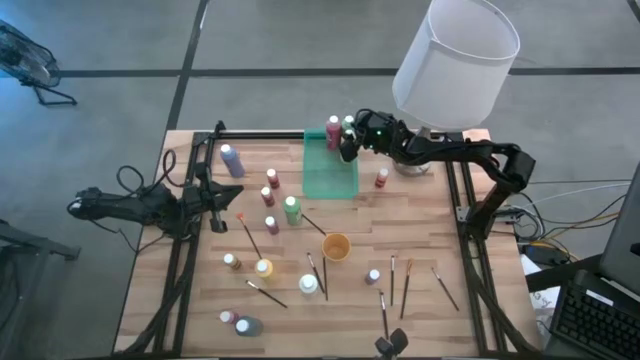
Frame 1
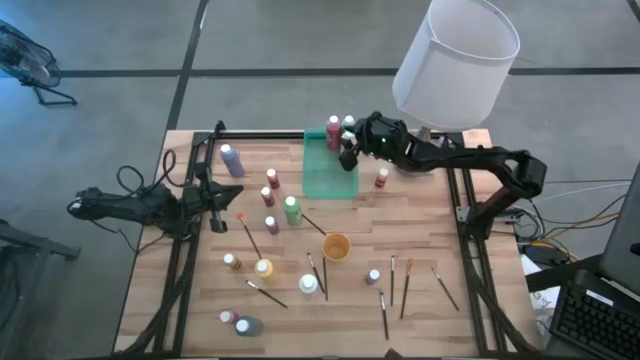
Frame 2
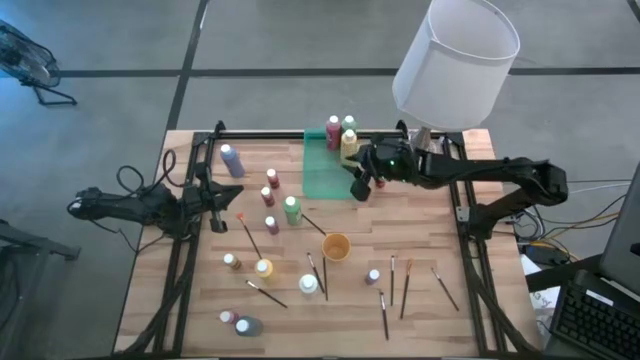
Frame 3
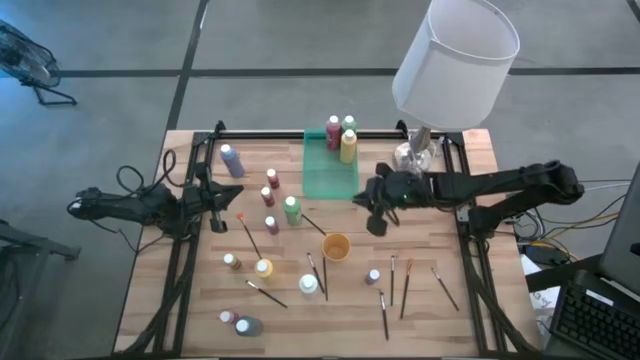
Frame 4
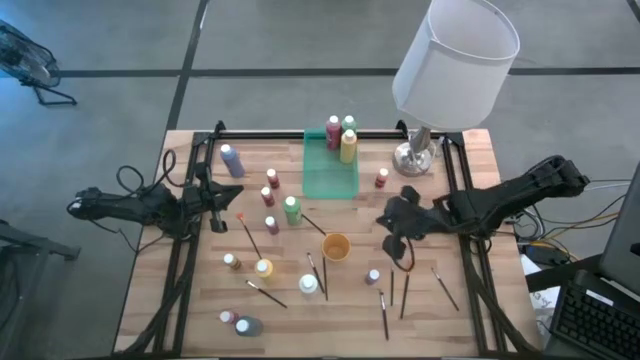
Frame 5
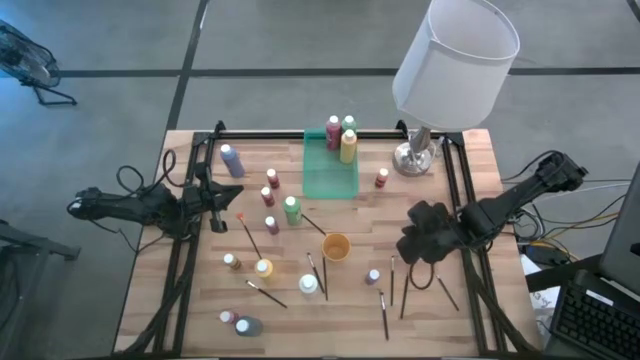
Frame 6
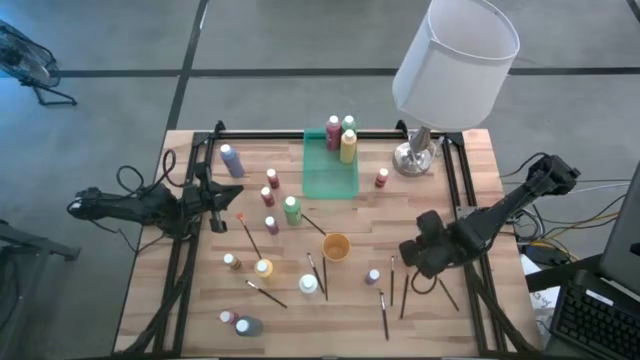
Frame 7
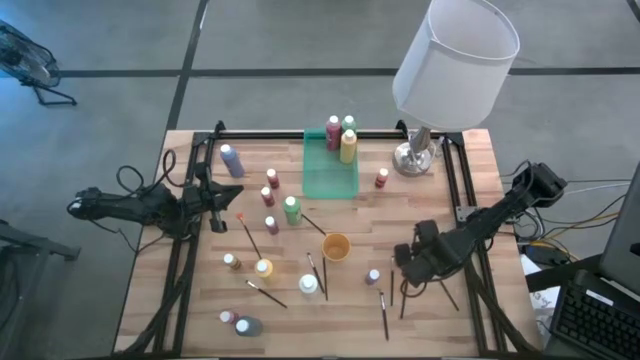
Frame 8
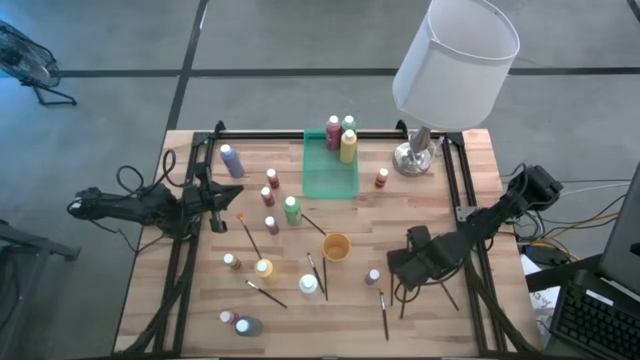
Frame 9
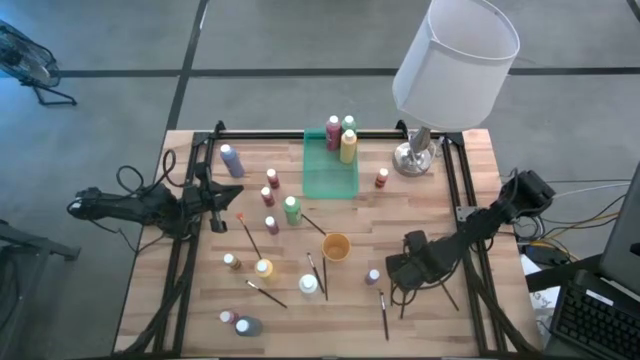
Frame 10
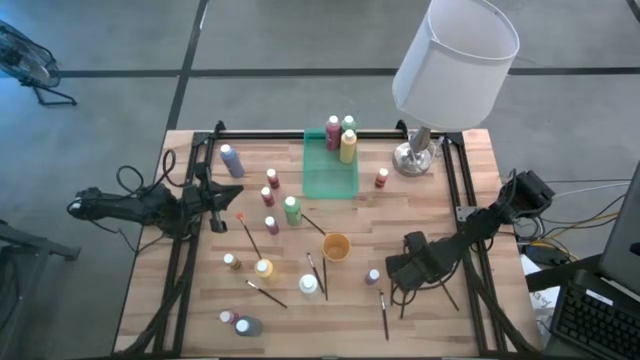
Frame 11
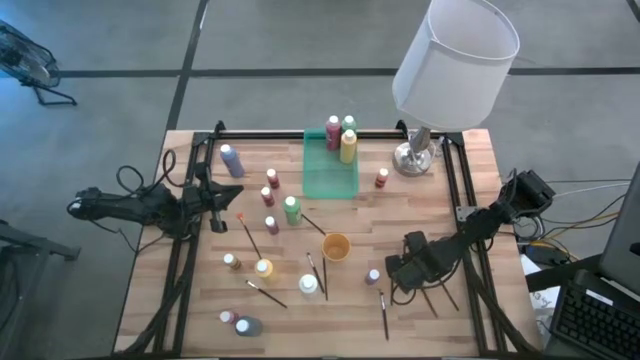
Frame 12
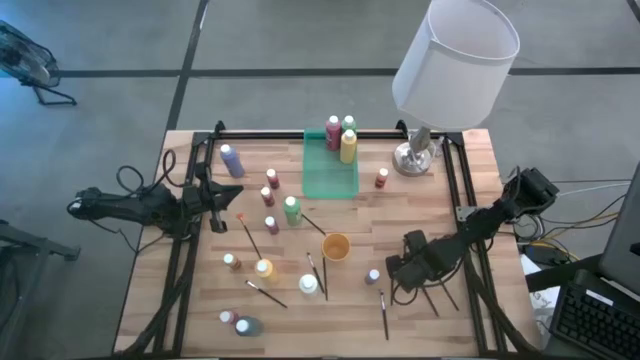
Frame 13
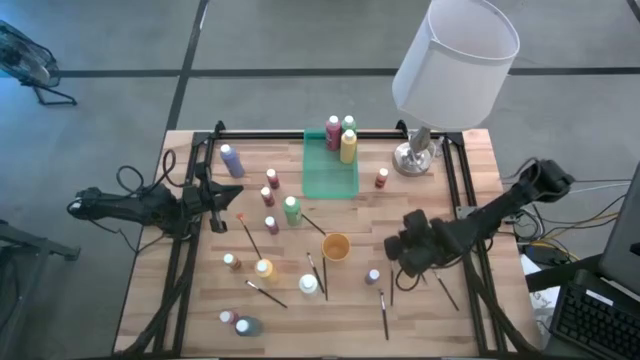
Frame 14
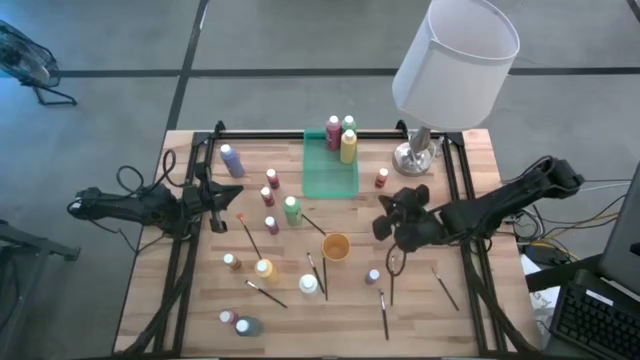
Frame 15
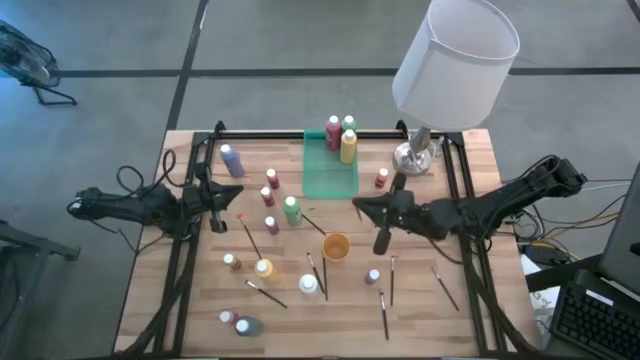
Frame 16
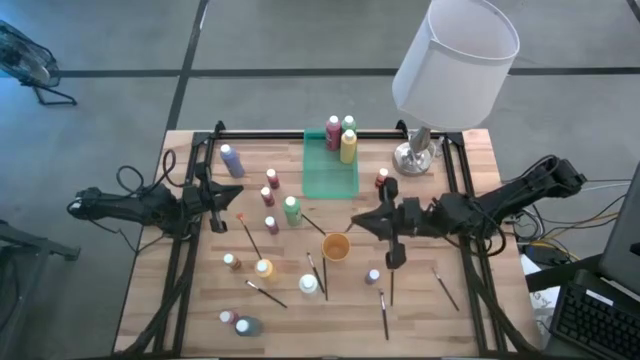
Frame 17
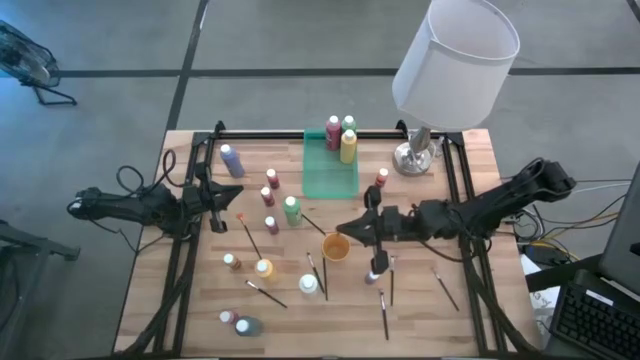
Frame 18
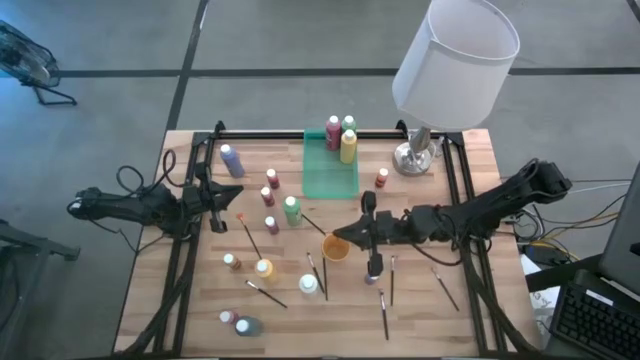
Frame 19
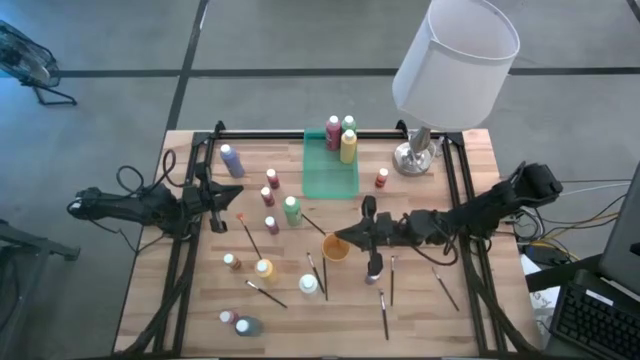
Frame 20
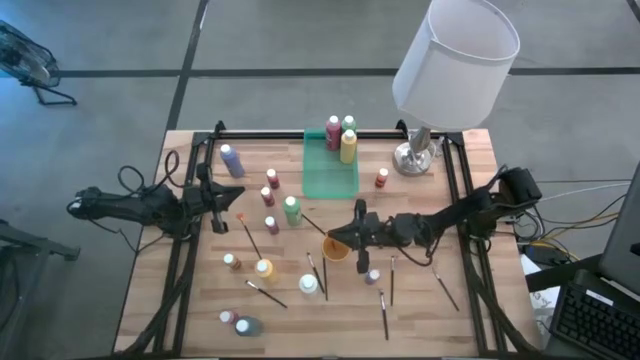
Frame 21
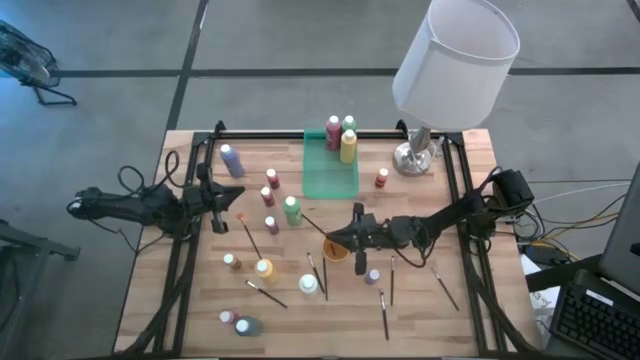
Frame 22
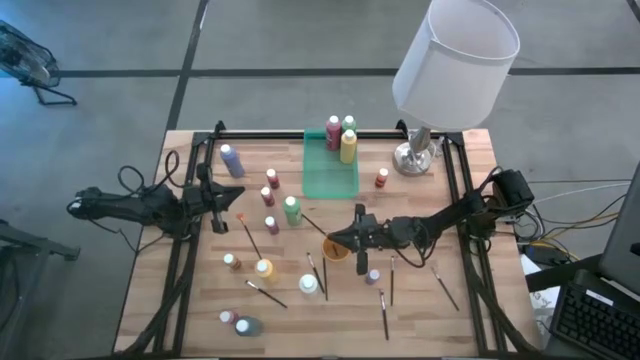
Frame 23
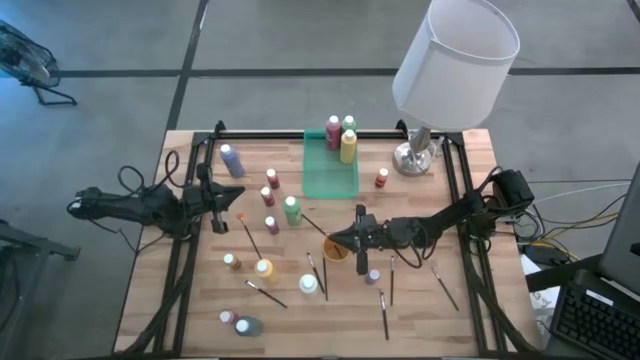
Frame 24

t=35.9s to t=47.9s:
Task: Pick & Place Paint Supplies
Put the orange paintbrush into the yellow cup

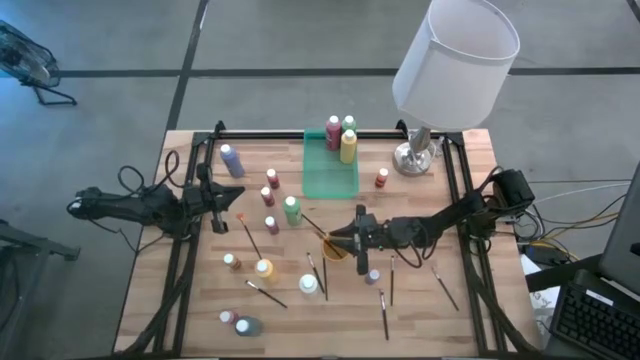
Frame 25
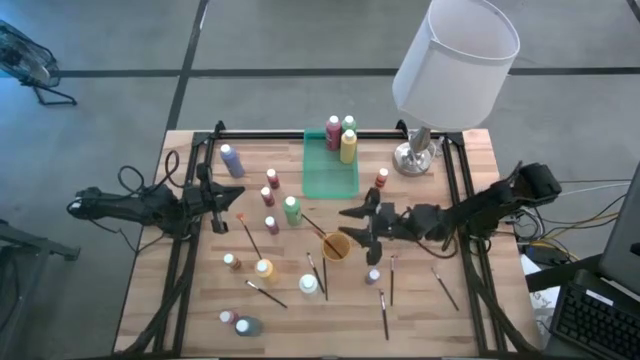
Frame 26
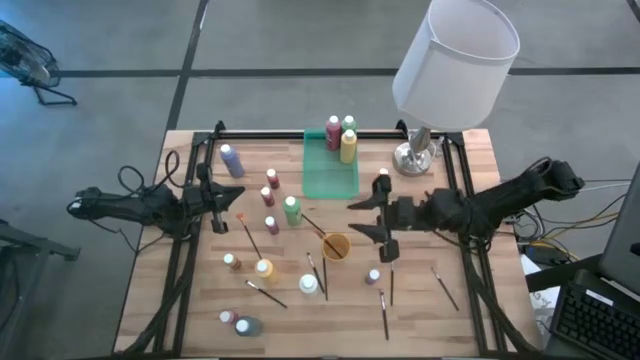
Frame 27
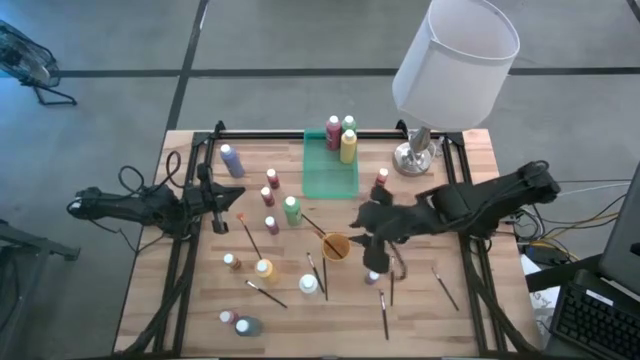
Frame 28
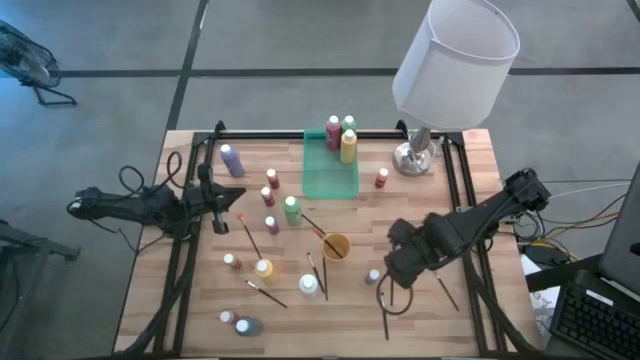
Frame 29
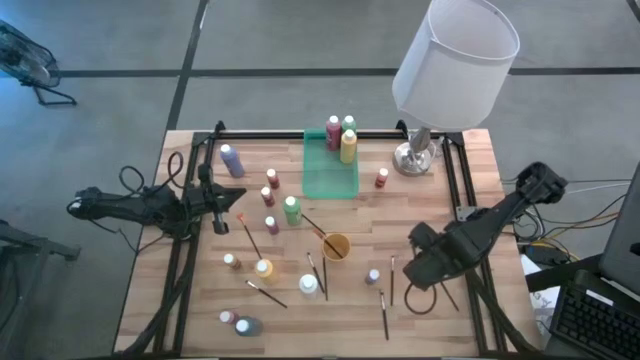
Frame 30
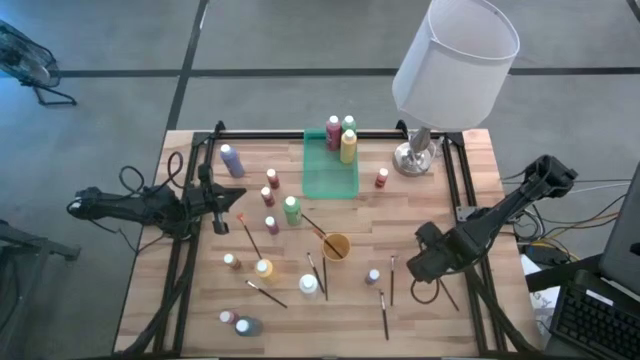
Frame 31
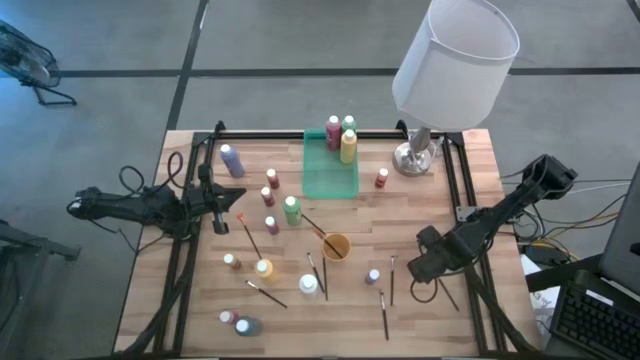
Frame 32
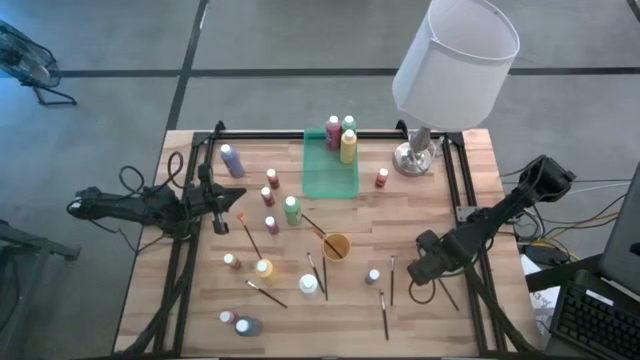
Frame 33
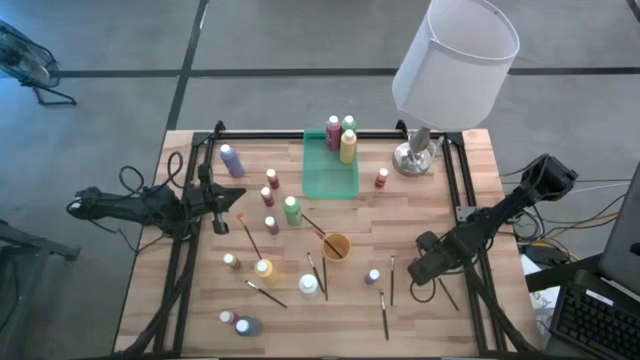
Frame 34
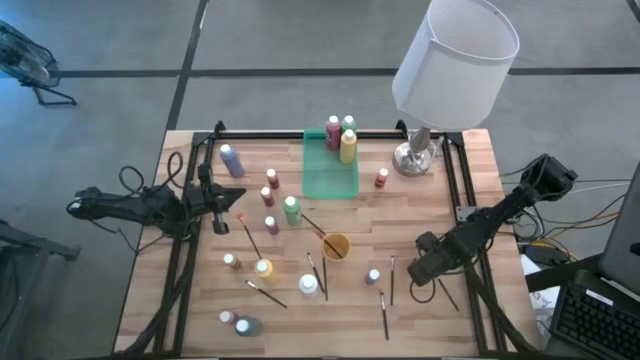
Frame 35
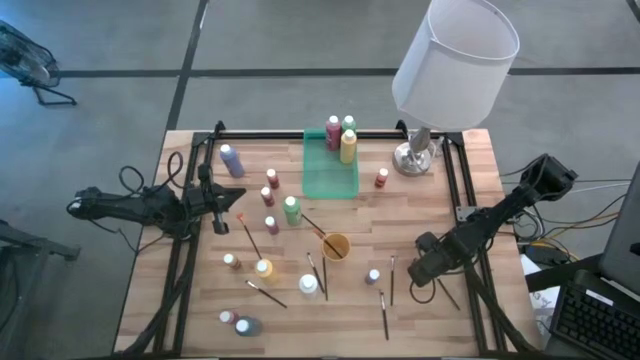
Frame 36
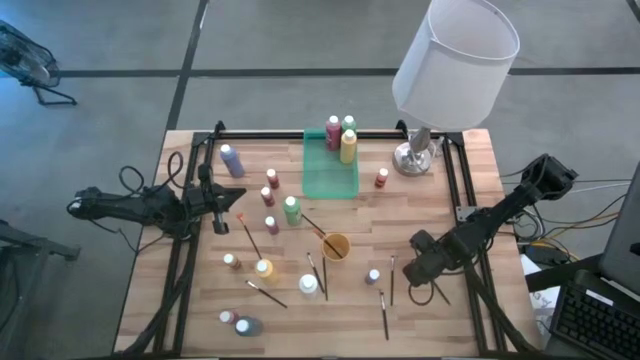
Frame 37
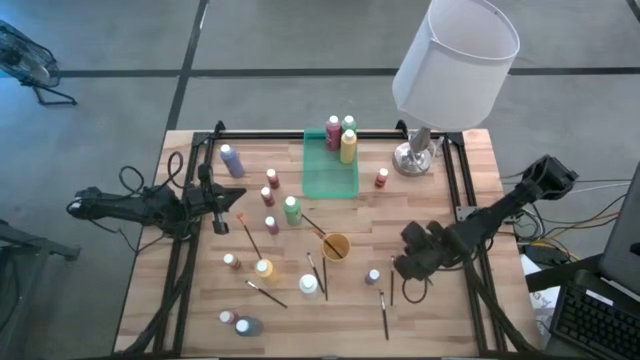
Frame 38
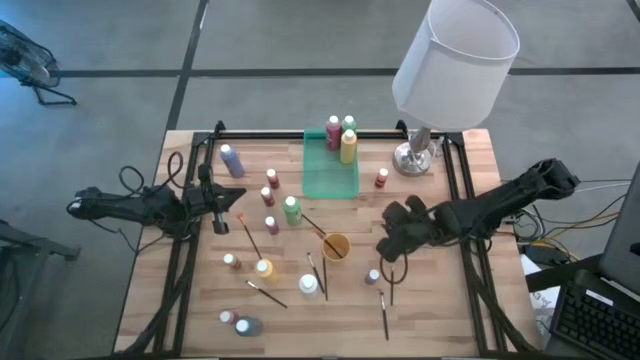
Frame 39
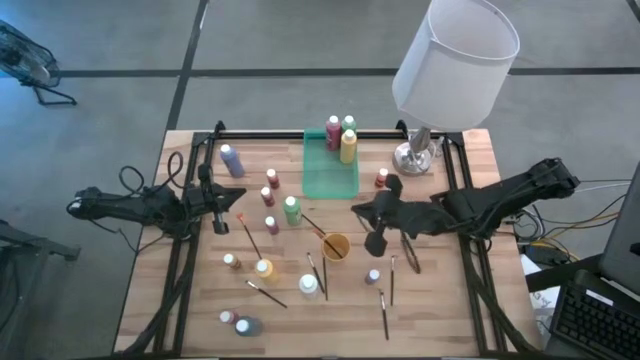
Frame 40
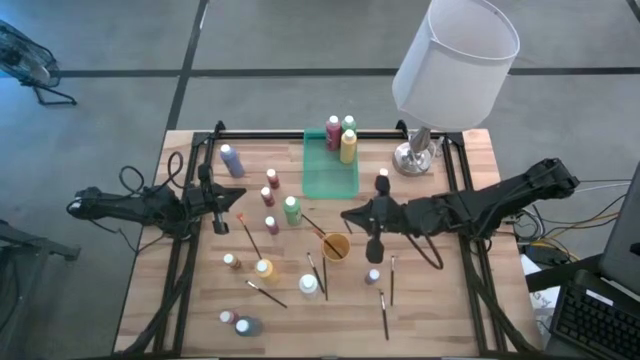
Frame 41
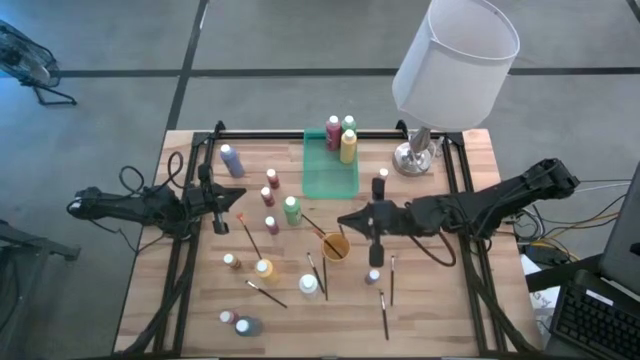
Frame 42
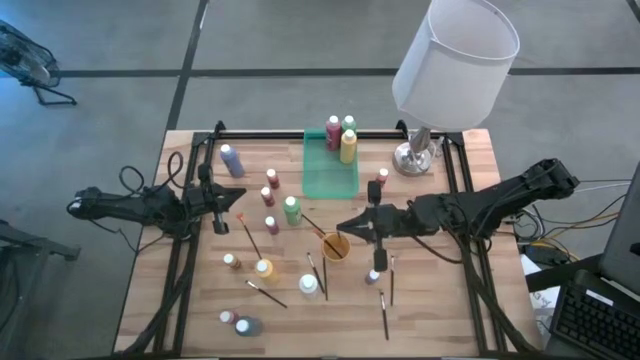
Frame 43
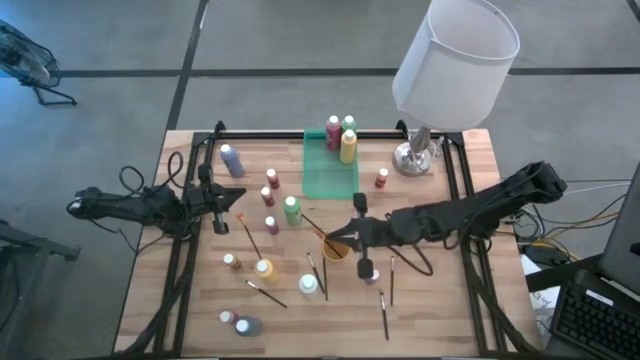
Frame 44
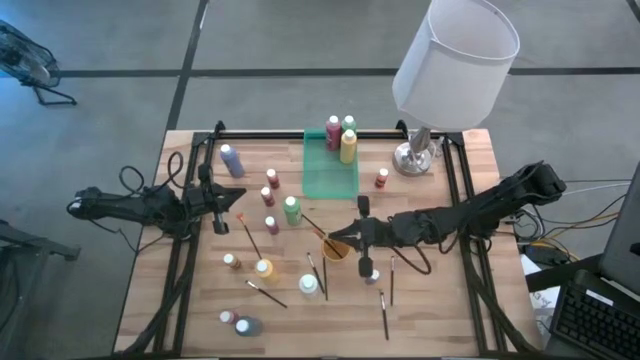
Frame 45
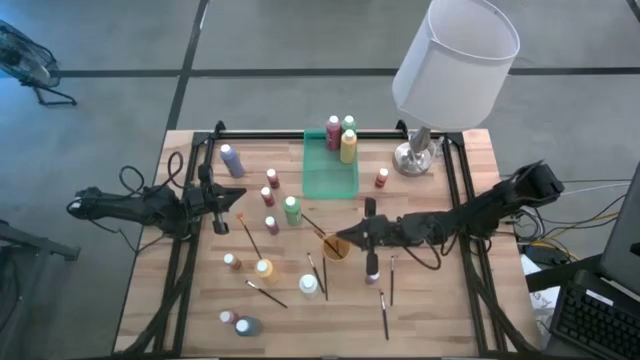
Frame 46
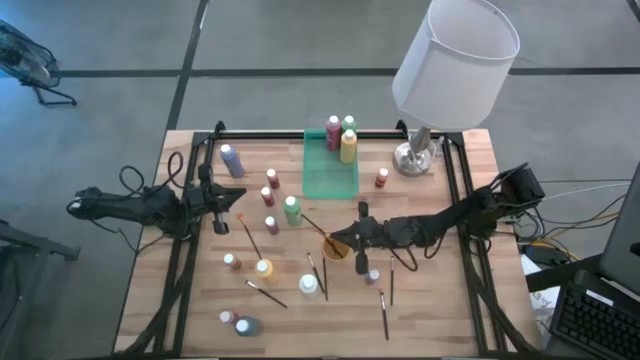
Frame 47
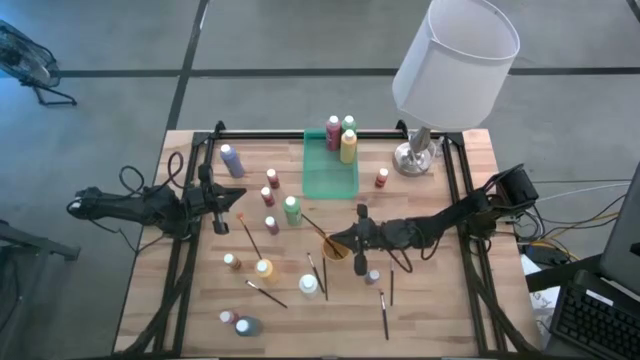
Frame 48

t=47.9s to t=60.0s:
Put the silver paintbrush into the yellow cup
